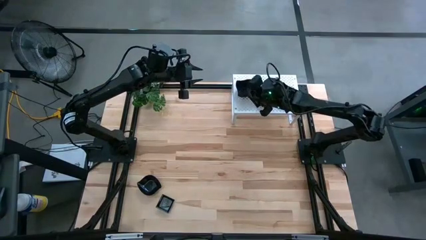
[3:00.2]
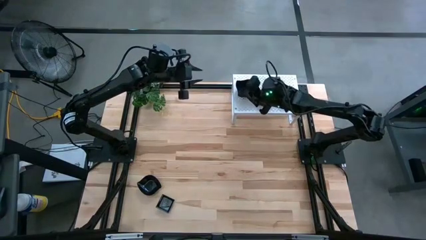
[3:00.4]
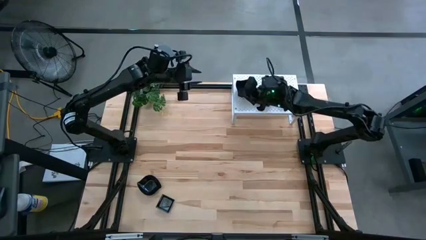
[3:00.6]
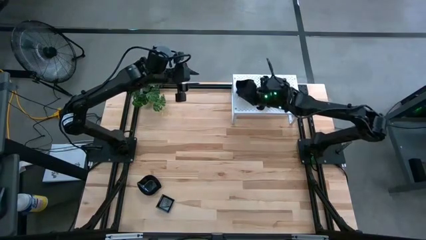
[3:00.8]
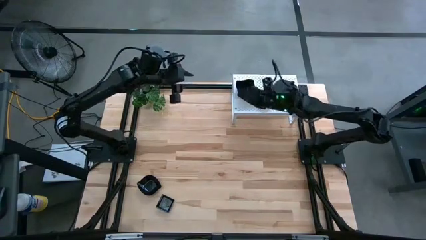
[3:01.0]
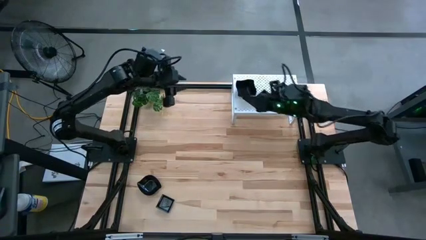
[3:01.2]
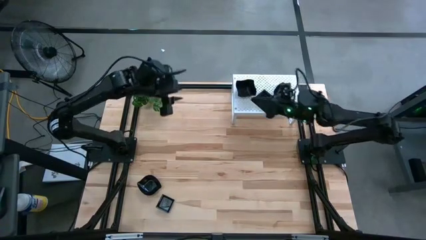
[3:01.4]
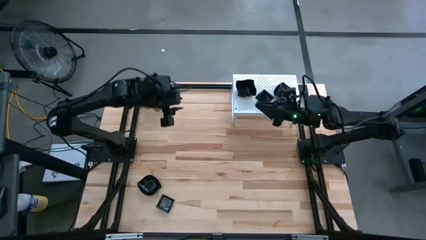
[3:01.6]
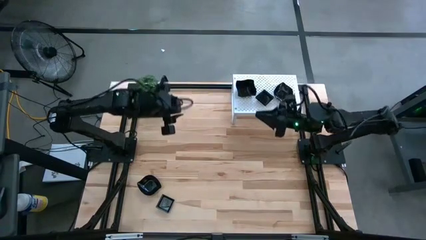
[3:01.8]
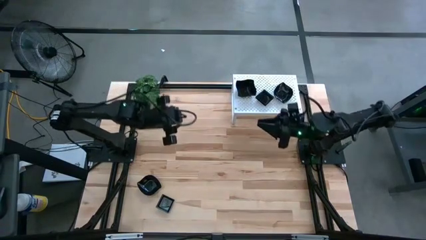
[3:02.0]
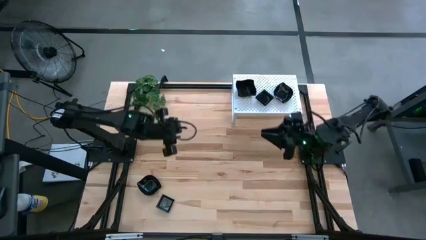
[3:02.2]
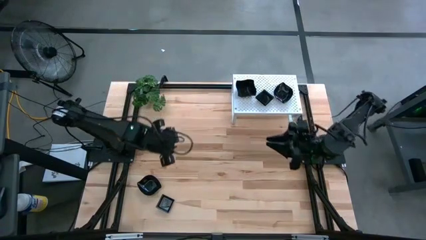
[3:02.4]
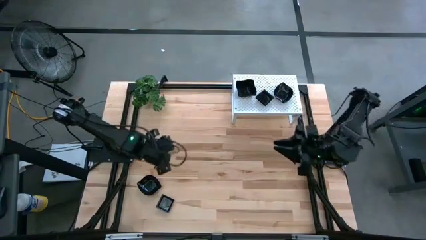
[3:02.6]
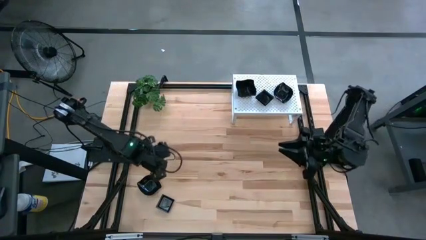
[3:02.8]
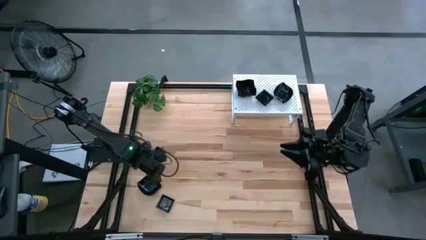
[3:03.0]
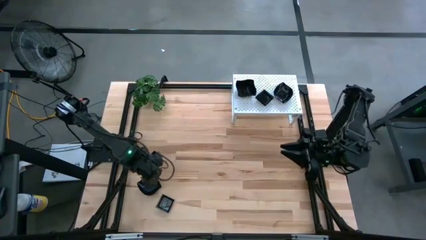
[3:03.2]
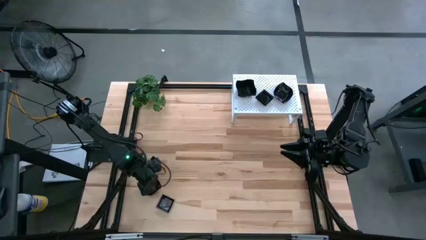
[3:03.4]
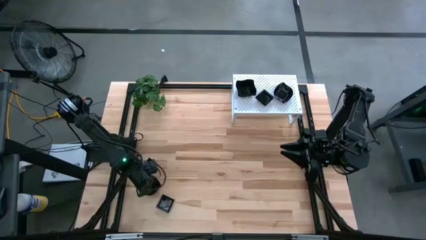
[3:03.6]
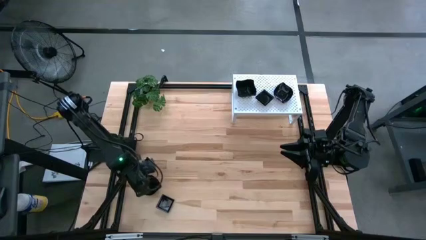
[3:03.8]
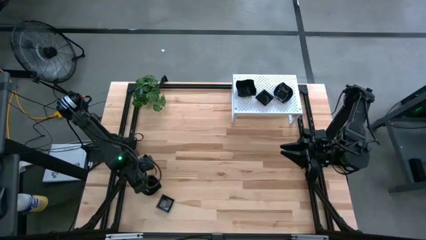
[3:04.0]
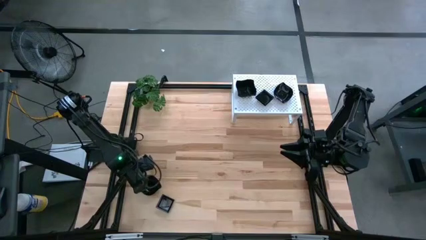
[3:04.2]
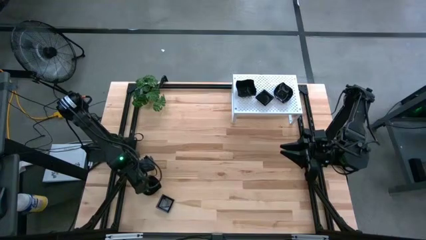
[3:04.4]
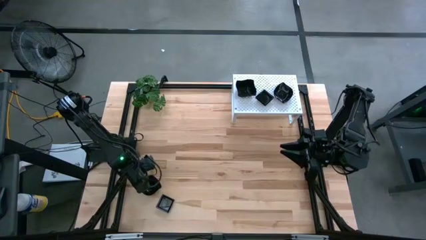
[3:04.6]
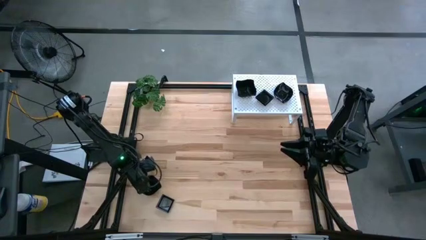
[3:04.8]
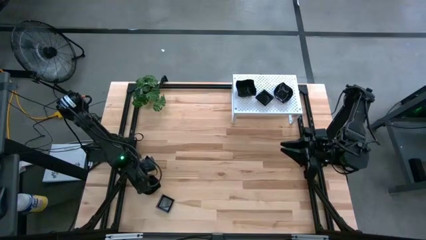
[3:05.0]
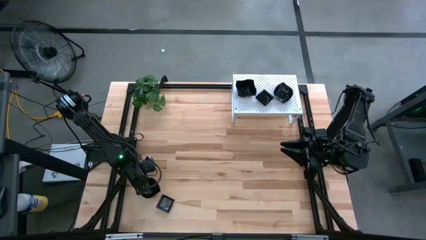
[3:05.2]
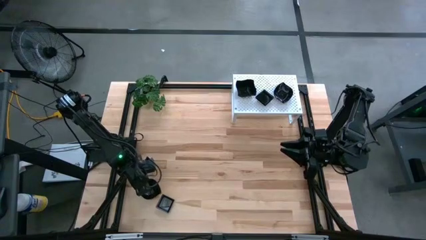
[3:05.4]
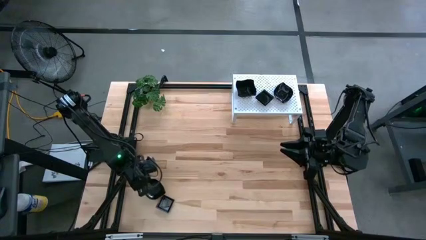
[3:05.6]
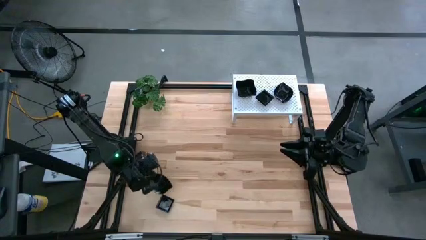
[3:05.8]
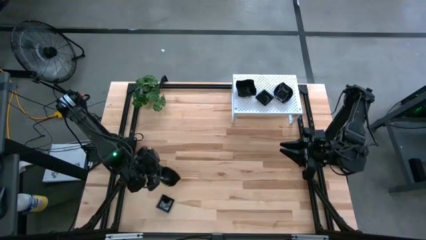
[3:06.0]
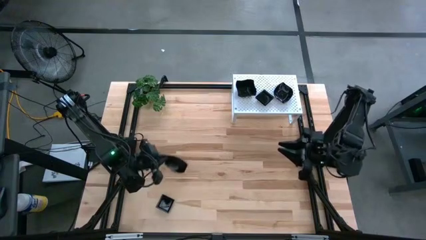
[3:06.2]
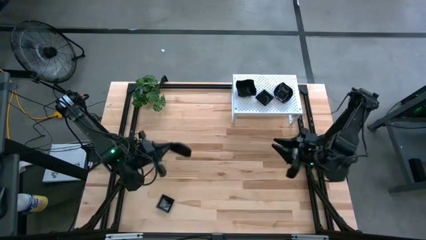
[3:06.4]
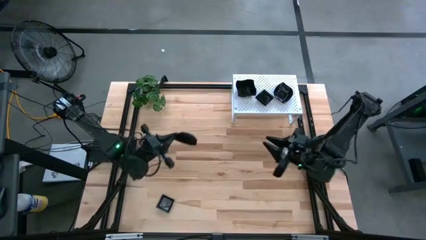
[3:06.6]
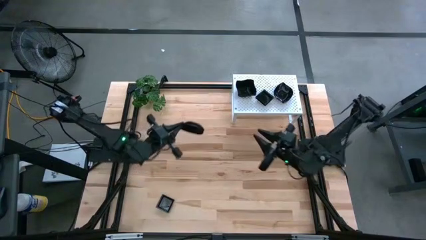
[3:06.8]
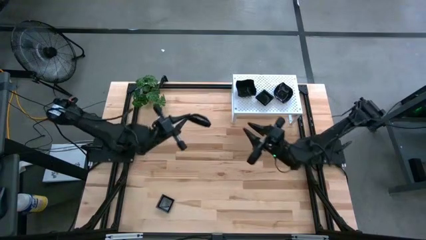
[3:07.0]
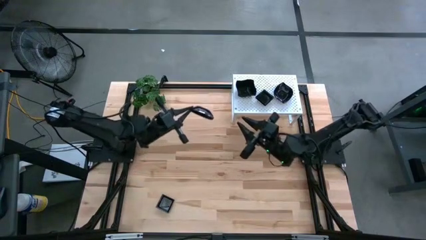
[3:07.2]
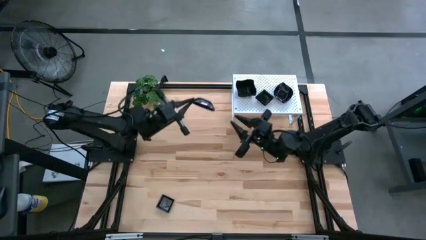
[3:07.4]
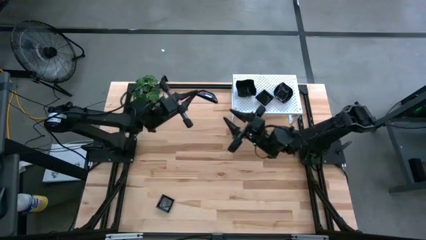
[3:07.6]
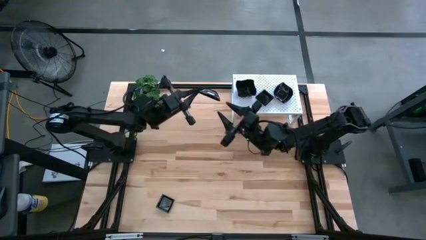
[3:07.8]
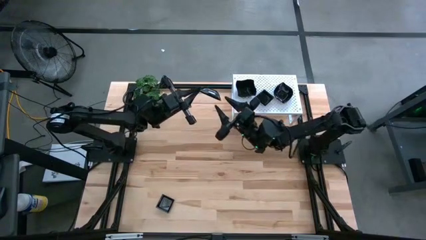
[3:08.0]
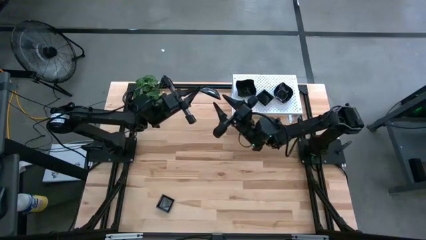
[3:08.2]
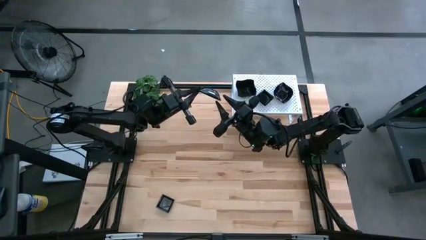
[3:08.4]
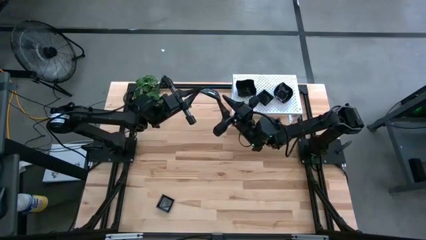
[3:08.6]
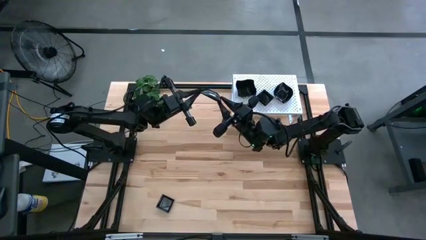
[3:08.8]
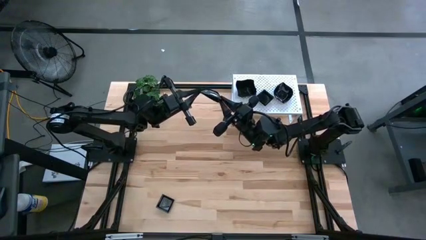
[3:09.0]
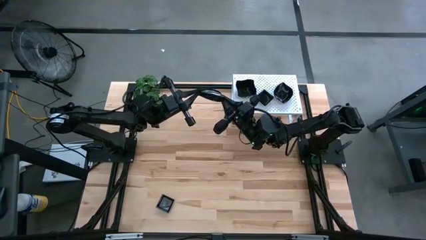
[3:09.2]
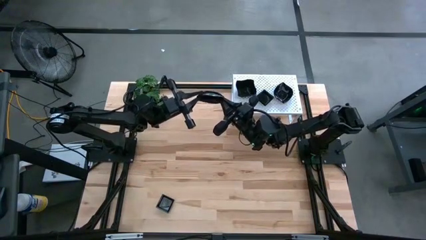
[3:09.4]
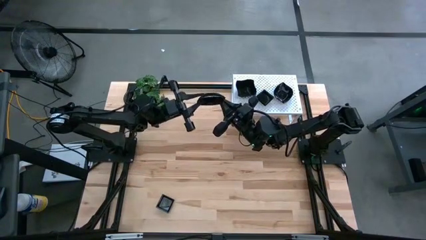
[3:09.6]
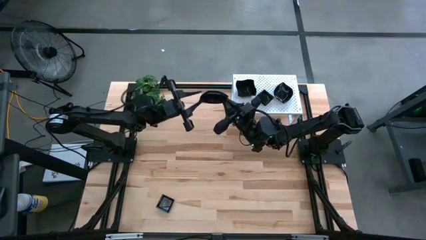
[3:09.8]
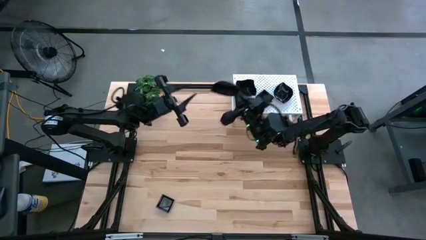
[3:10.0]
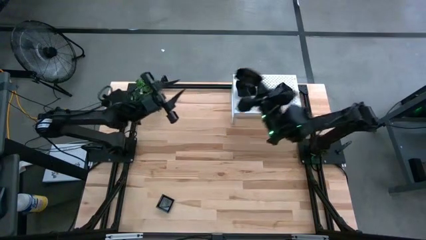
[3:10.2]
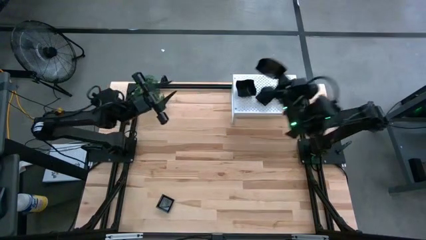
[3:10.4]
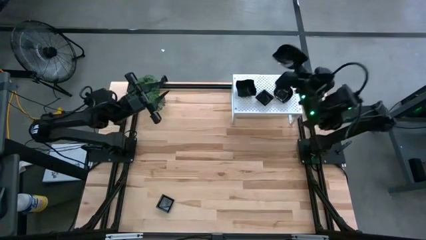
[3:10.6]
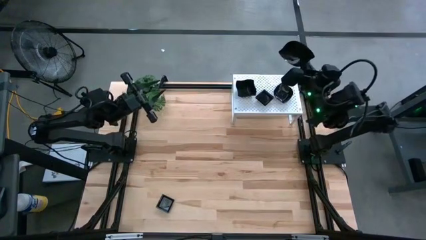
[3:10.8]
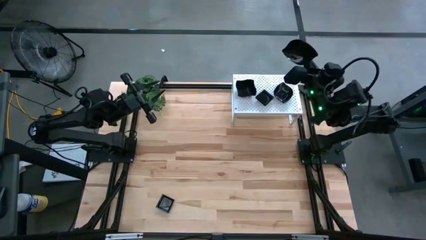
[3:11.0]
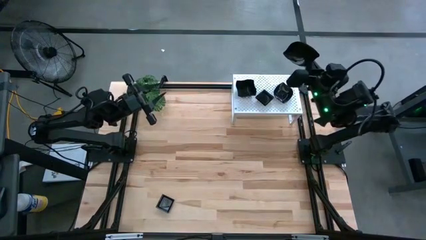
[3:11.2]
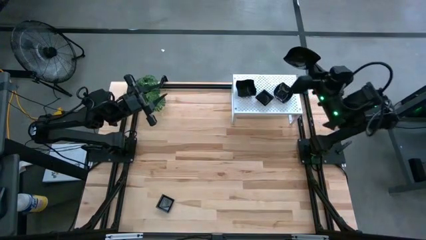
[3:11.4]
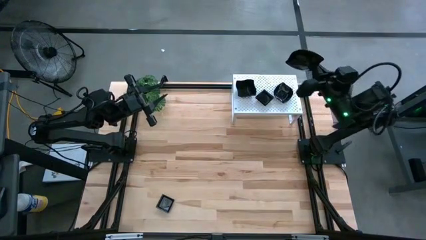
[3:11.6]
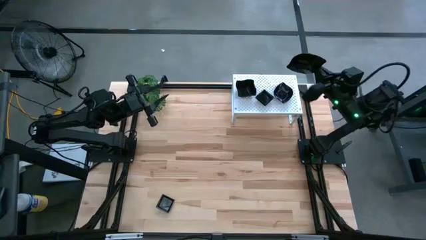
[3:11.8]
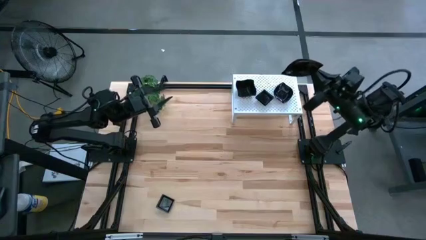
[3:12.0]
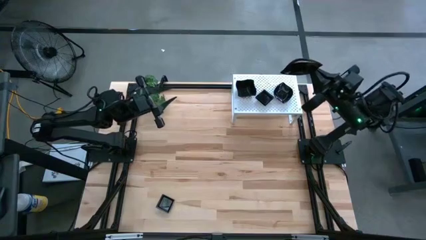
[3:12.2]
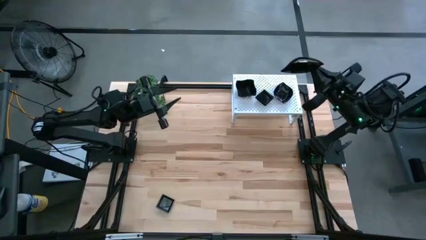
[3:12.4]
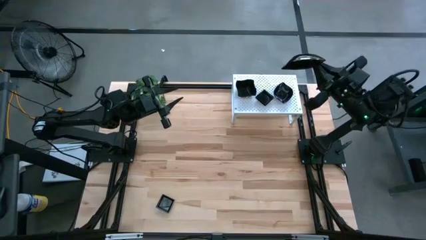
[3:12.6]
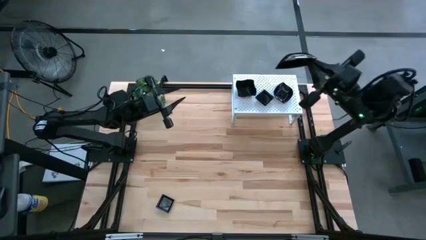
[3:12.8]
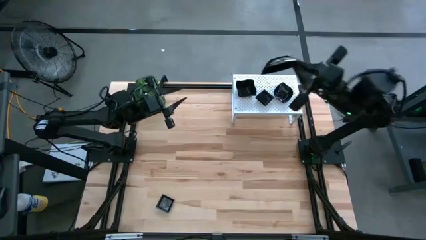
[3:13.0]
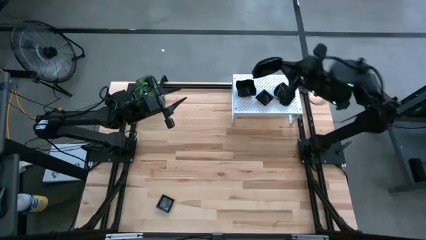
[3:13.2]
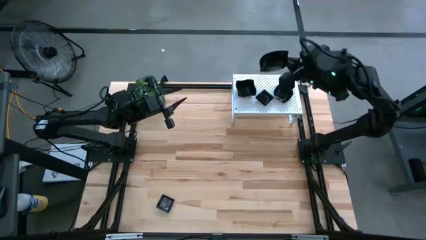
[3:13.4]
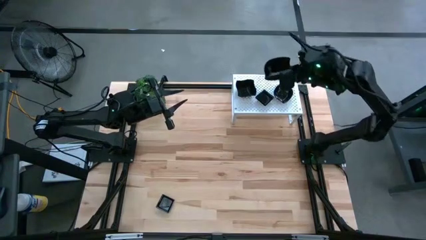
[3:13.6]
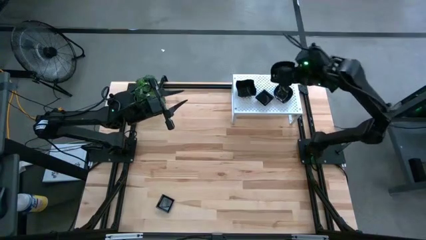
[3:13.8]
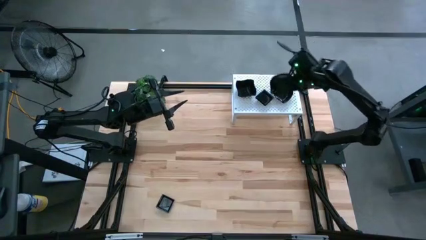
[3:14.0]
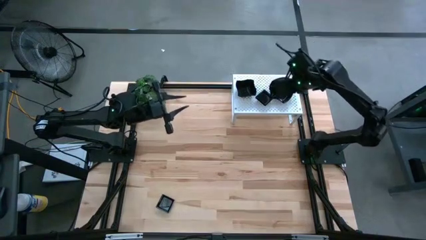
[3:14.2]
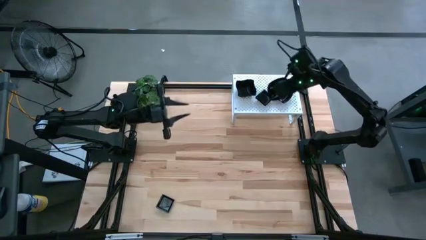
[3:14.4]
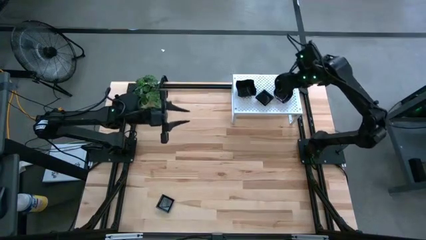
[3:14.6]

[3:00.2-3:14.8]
Task: Pick & Place Mini shaped plates
Stack the leaf-shaped plate on top of the leaf-shaped plate on the shelf
